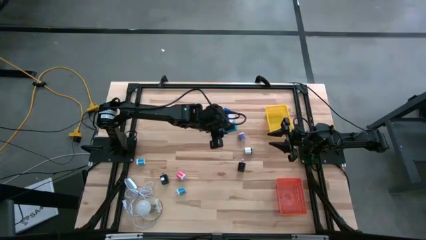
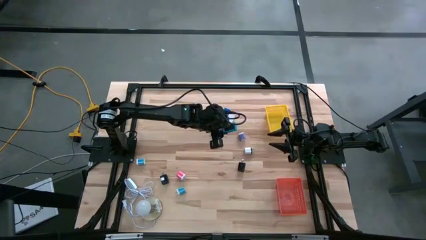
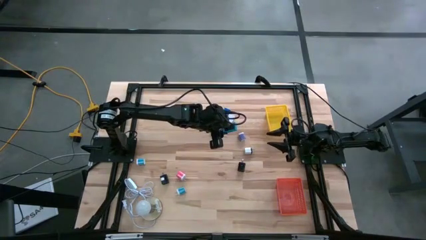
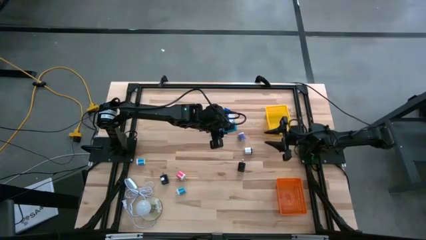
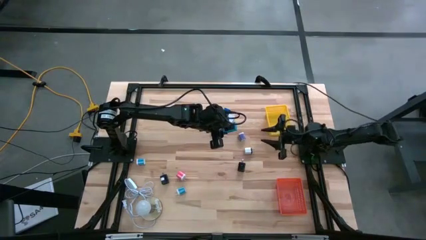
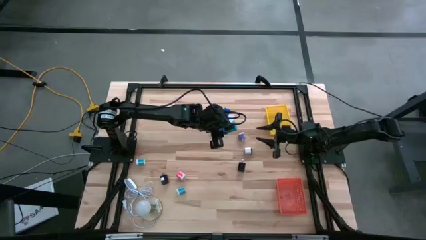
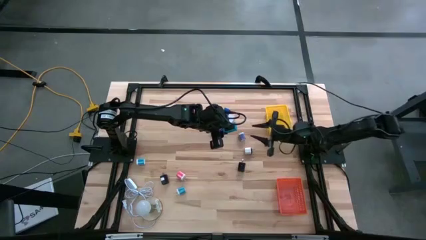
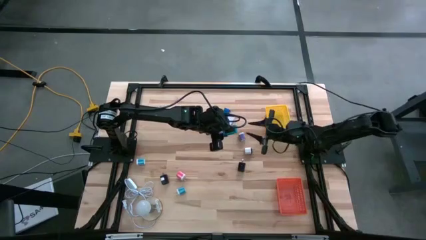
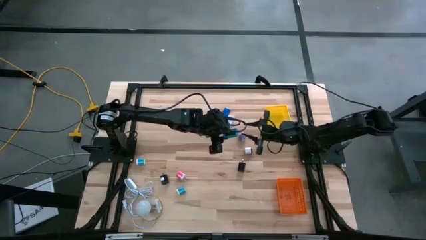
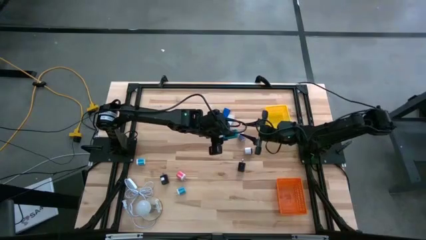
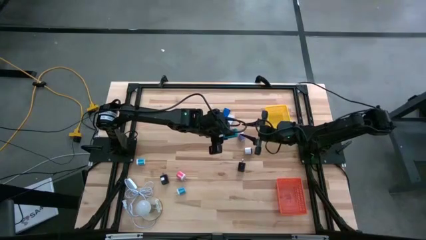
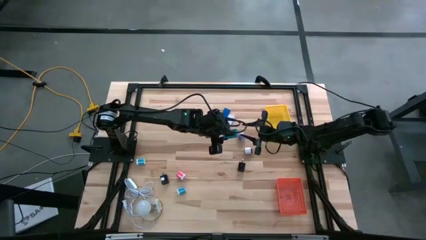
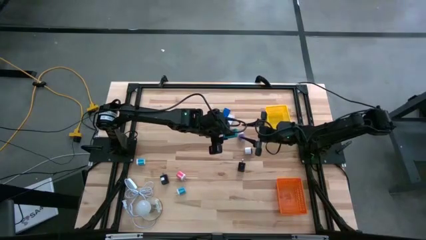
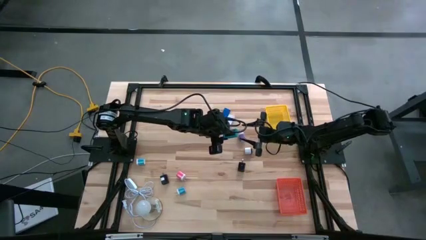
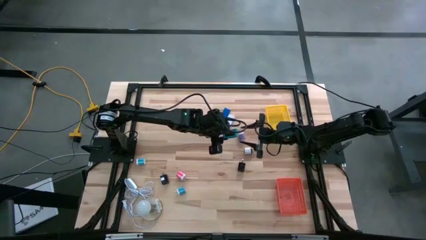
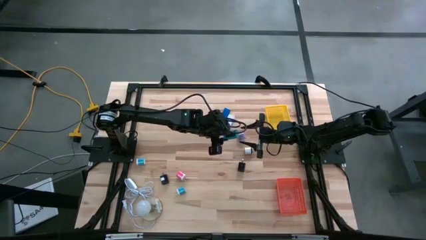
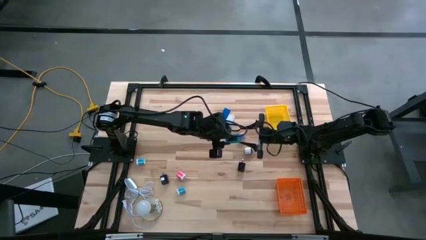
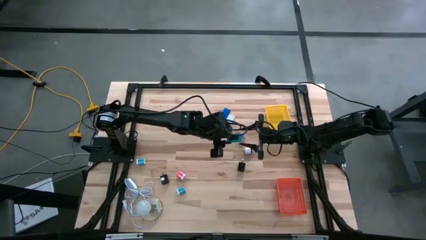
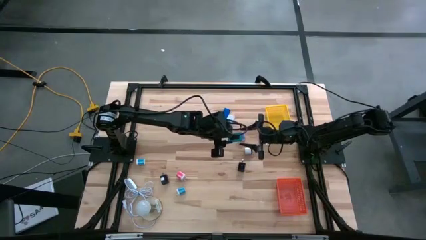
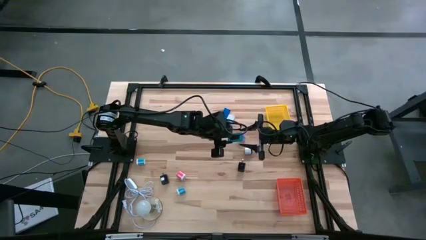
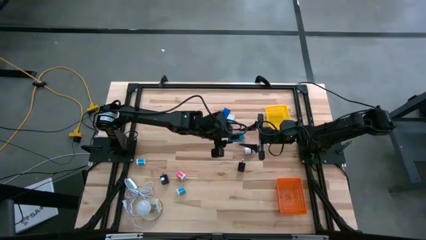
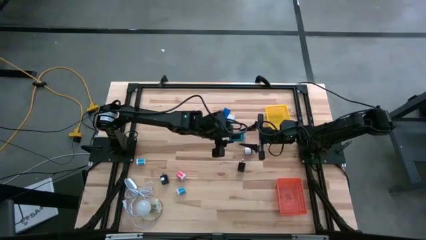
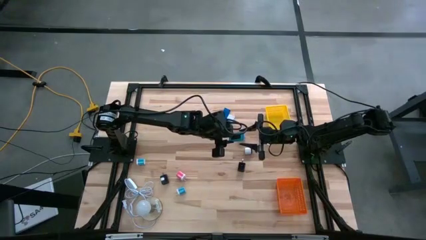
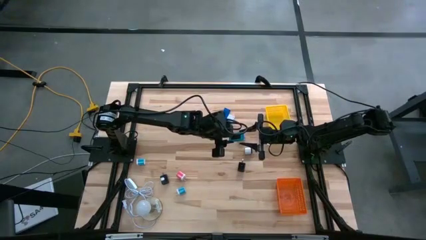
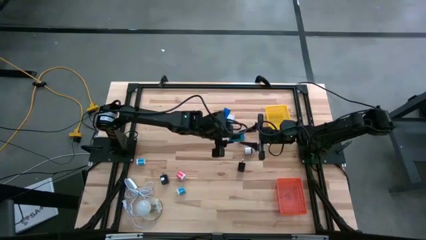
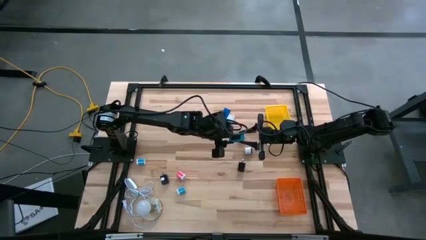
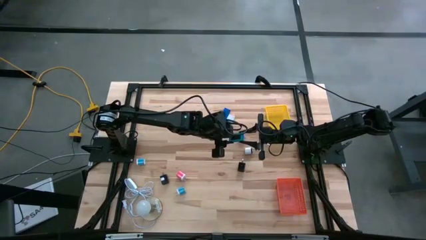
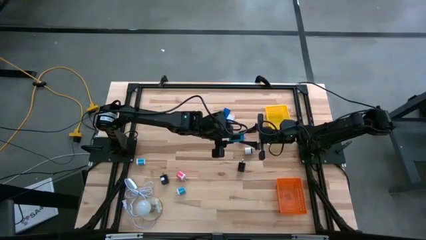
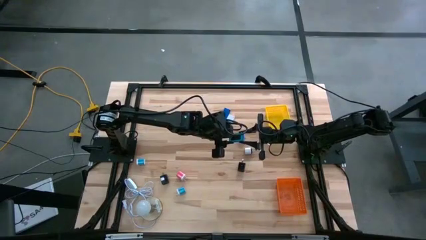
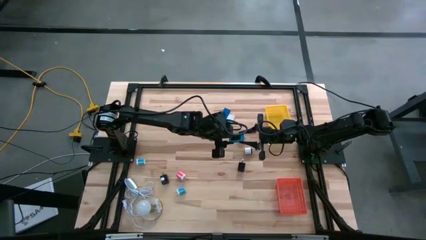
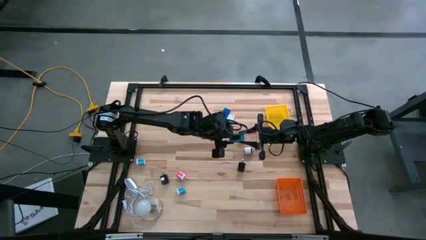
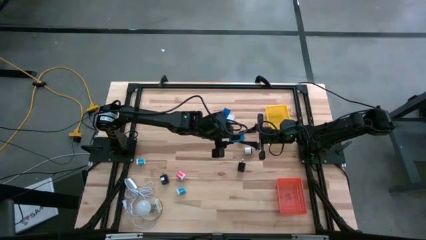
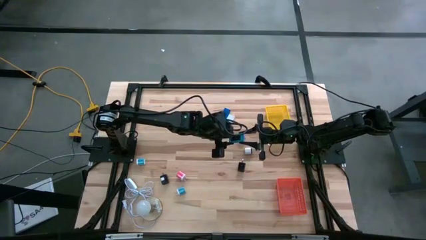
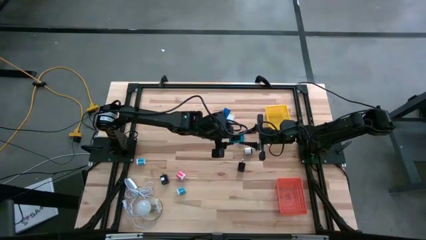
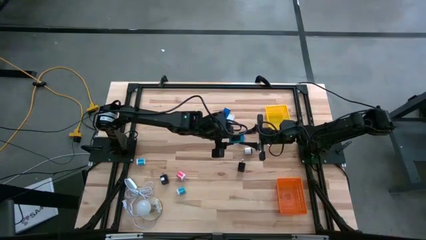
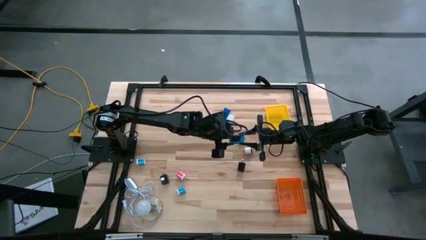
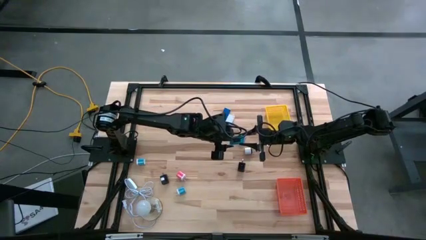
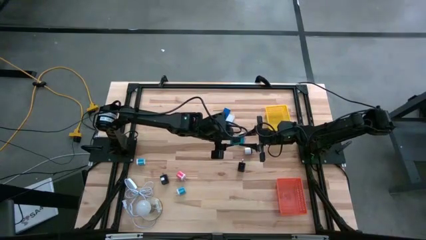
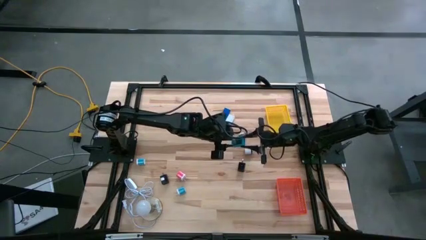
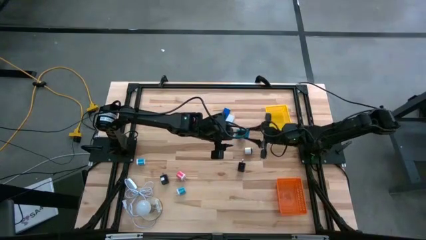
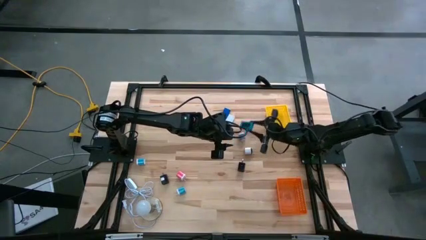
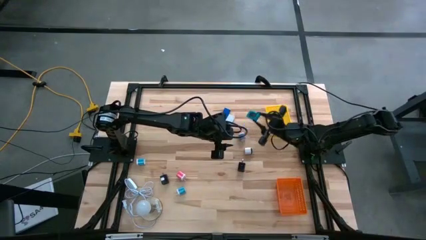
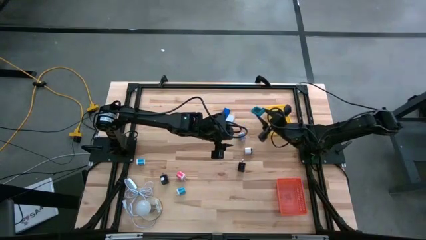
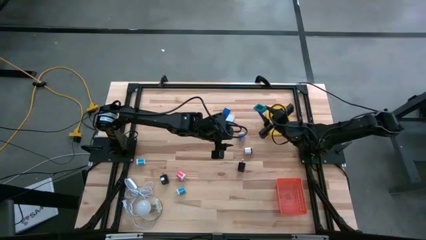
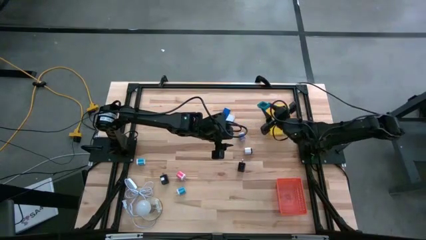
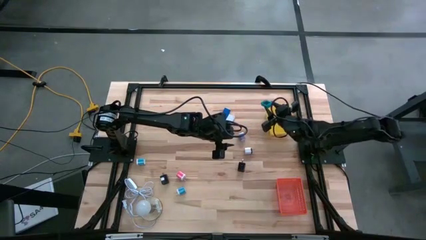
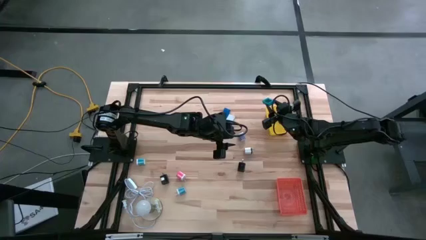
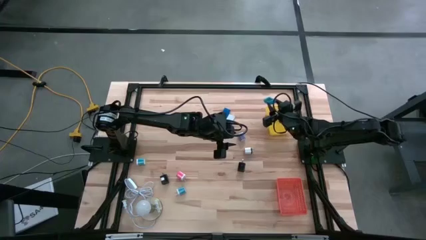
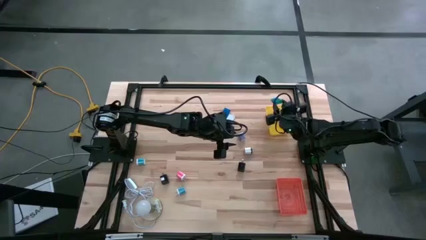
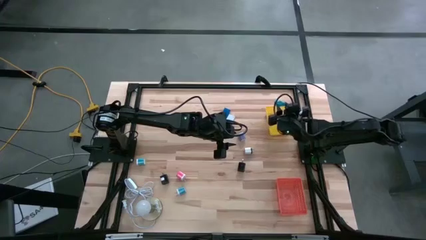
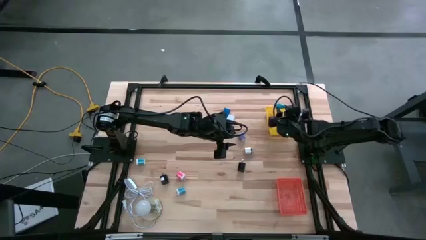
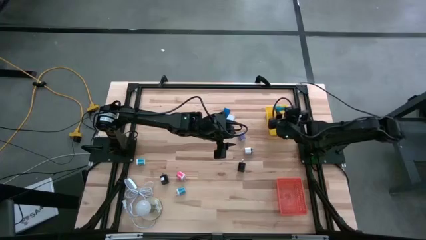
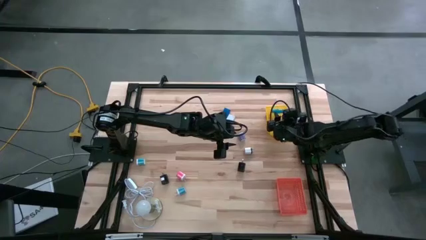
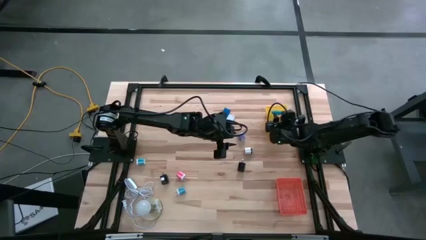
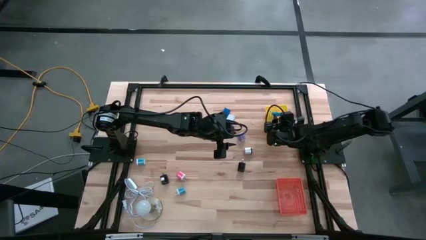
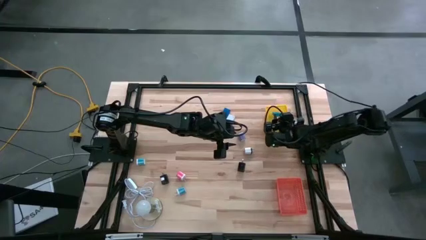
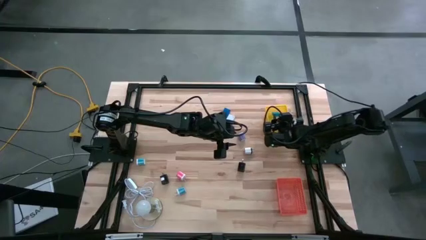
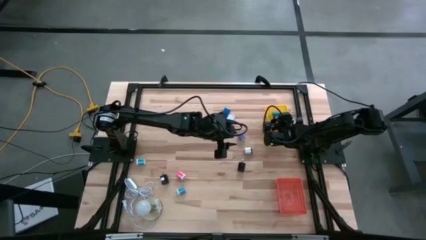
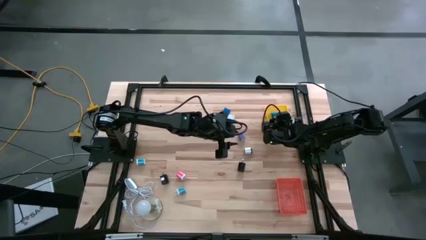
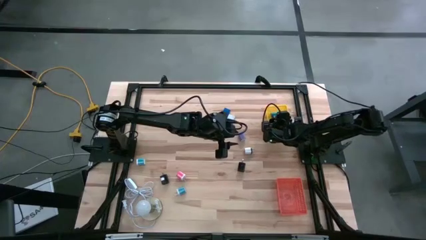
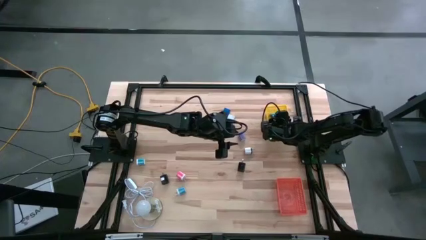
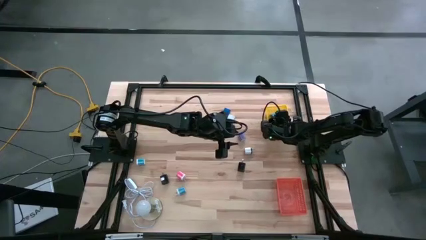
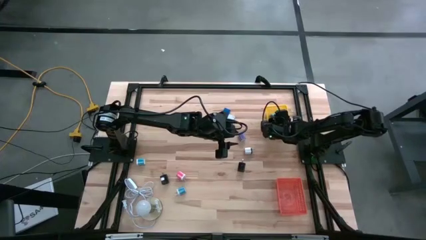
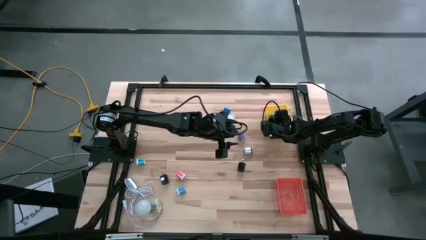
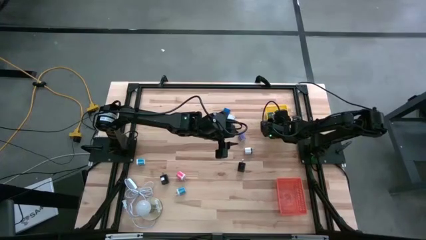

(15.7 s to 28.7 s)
Task: Pick & Place Office items
Put the light blue digital clock into the yellow bin
